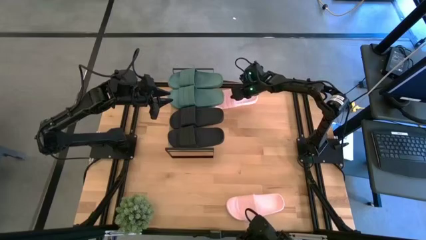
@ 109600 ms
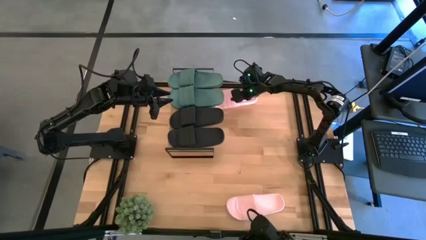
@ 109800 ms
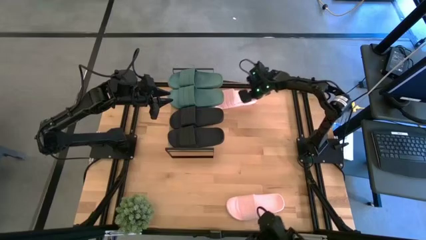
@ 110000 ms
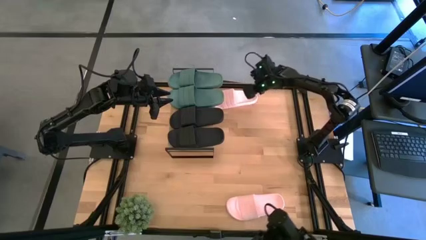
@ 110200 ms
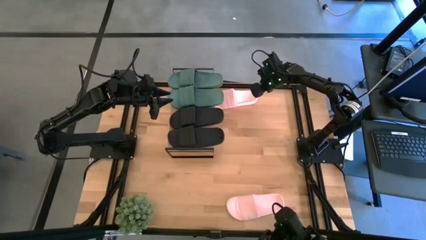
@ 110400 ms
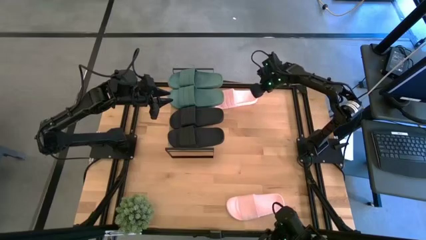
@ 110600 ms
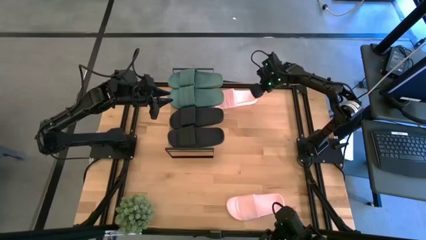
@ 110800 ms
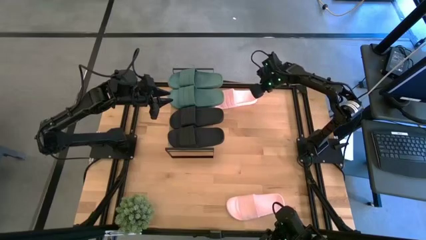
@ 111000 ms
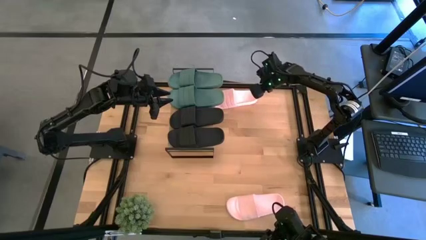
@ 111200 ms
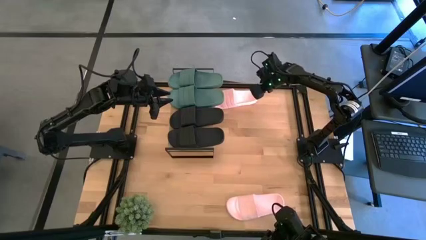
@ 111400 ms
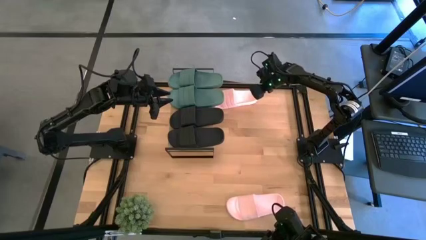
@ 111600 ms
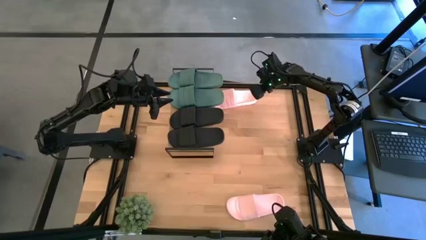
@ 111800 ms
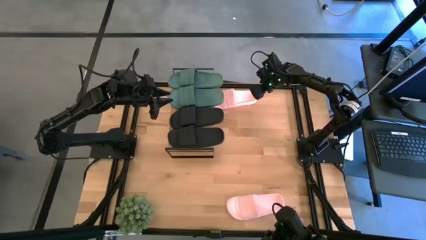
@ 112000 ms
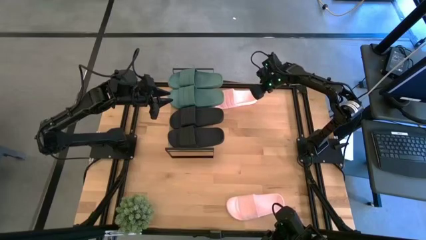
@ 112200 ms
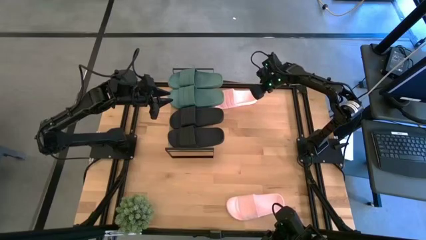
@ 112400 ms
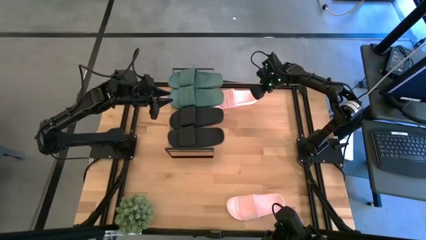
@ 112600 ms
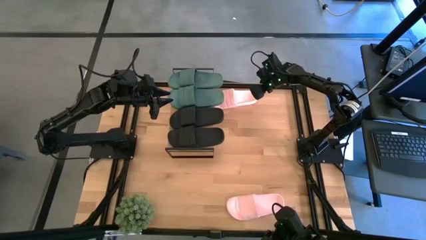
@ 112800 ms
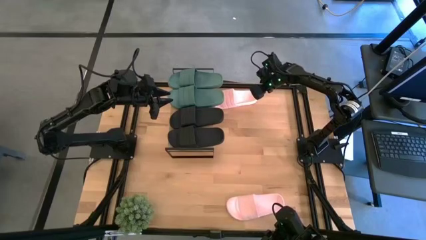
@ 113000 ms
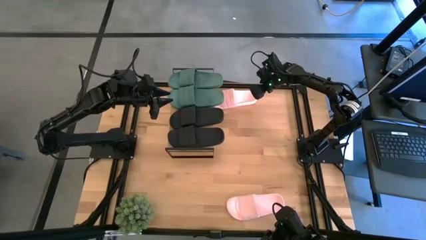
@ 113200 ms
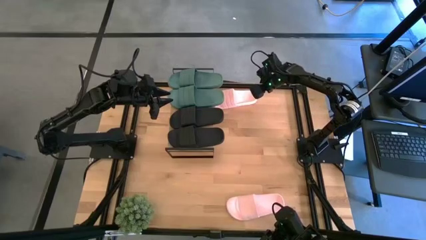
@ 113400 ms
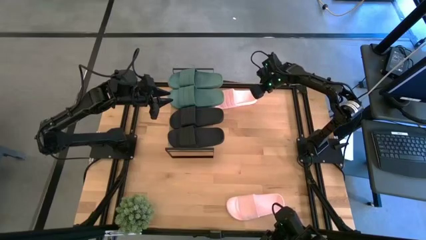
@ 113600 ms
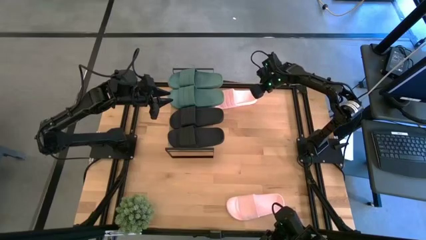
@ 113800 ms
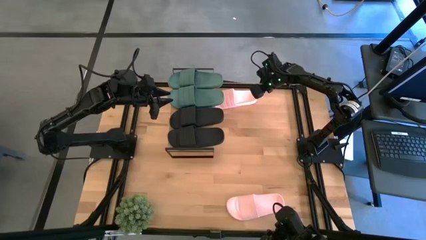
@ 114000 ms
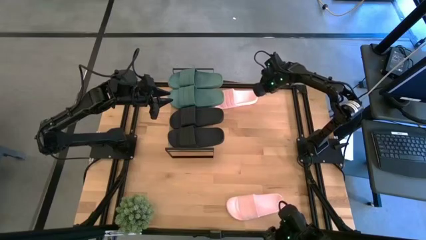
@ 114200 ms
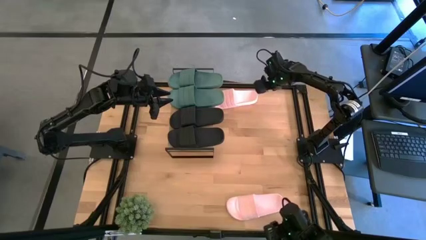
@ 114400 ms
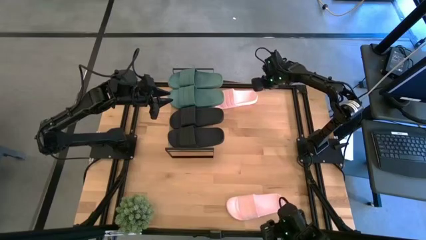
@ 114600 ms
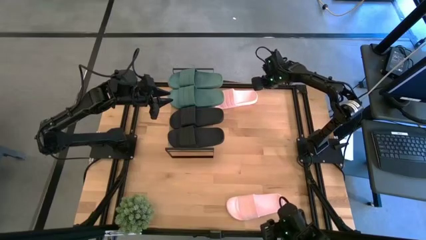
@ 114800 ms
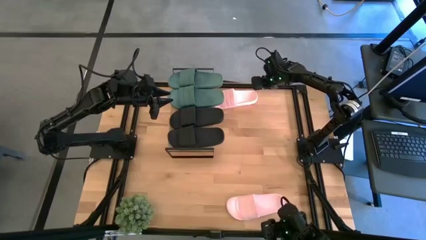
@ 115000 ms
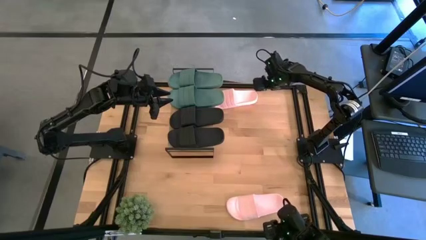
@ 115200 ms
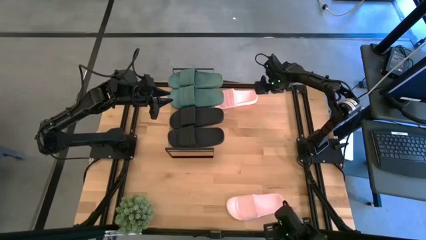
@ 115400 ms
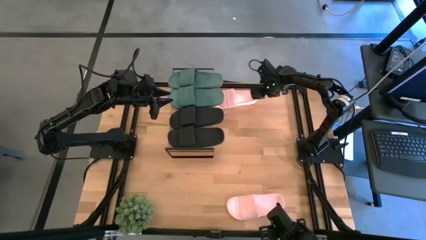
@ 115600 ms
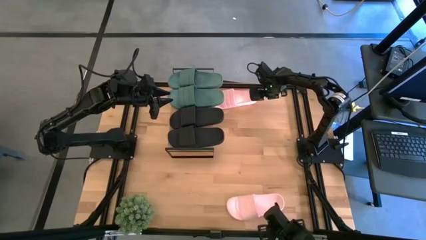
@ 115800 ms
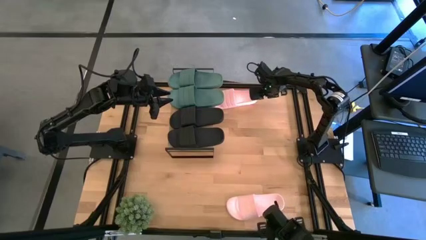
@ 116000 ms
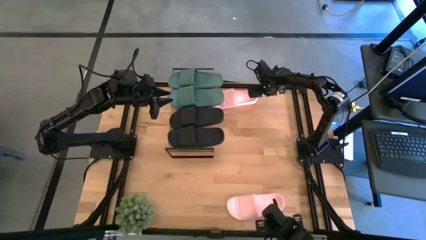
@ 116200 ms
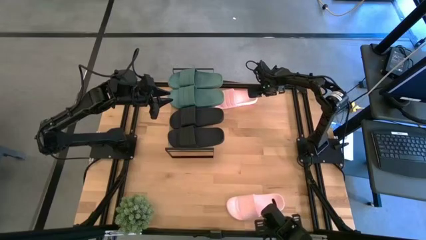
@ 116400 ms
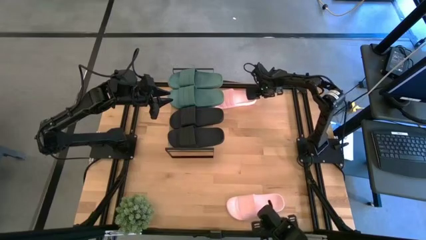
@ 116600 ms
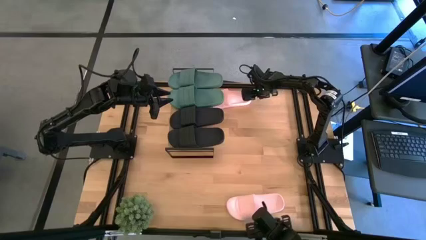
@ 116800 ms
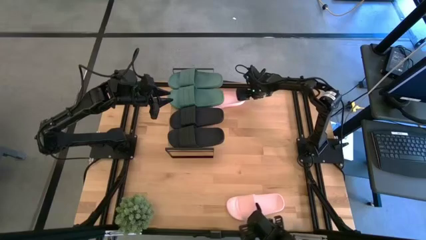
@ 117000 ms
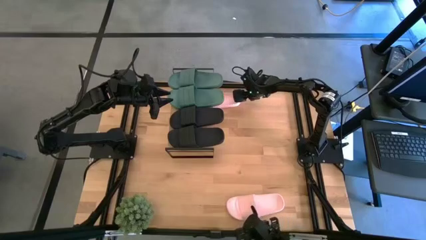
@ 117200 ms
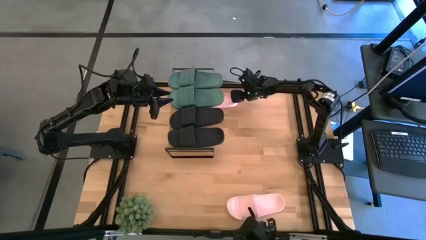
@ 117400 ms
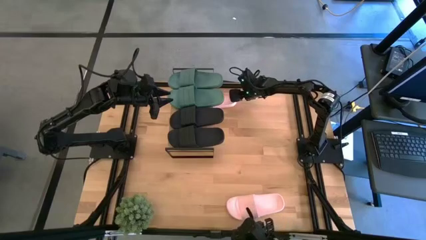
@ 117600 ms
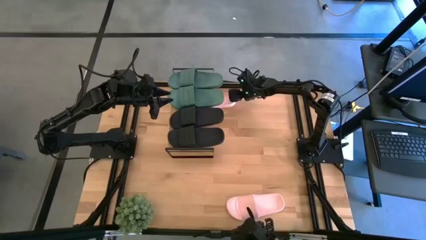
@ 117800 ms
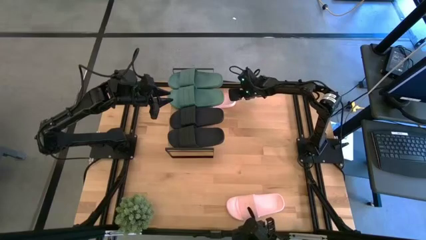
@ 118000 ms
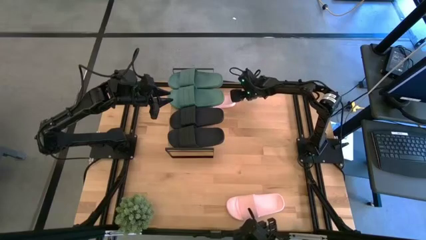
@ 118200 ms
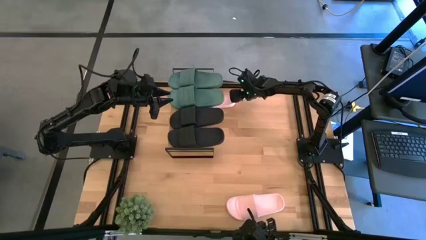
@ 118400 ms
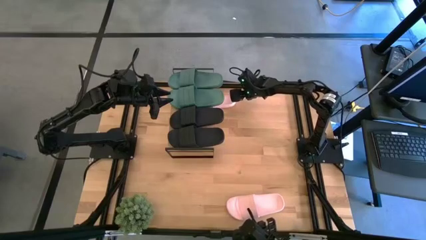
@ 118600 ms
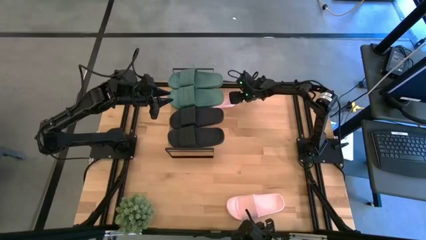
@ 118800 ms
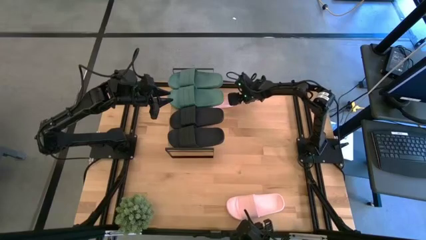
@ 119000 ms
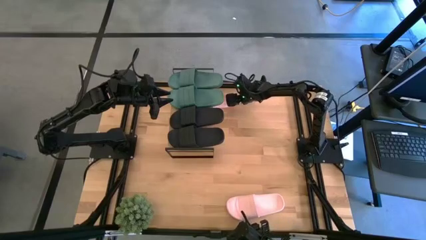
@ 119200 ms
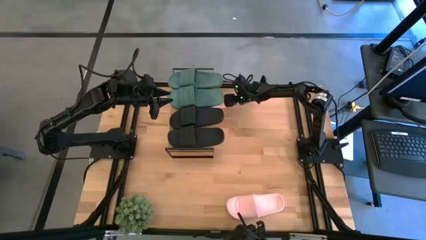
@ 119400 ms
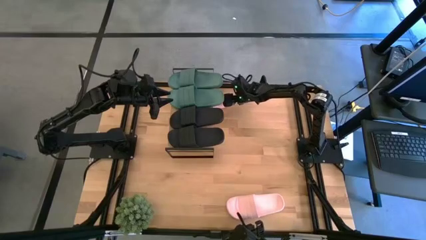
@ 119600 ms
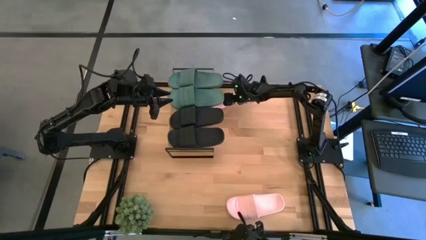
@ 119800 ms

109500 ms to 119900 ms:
Task: Pick and place slides into the shelf
Put the right pink slipper underneath the shelf
